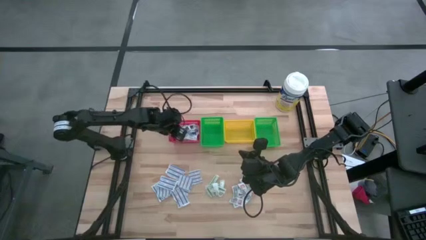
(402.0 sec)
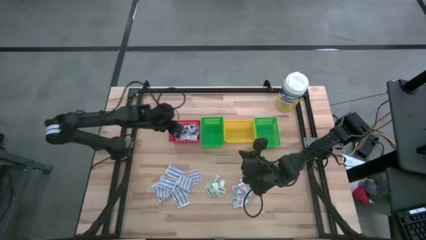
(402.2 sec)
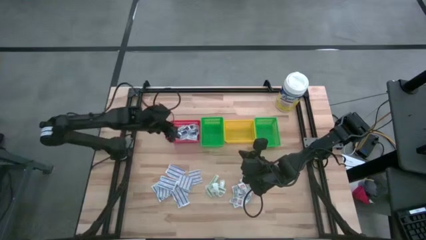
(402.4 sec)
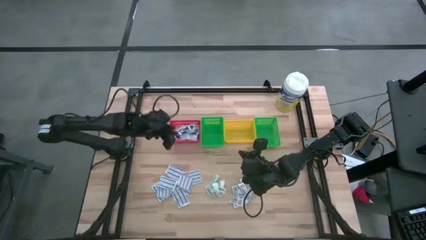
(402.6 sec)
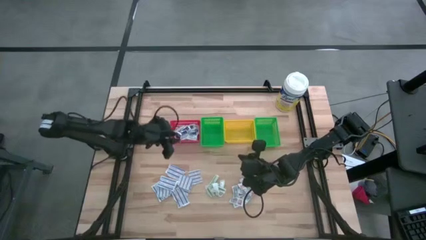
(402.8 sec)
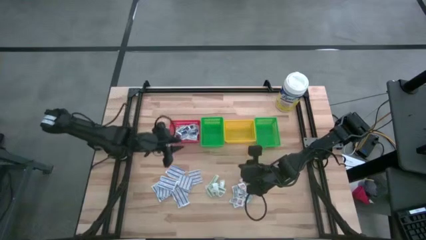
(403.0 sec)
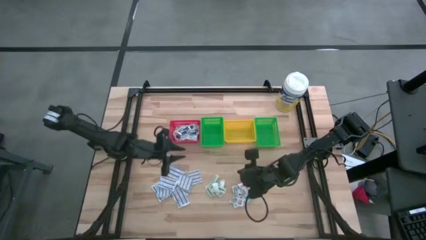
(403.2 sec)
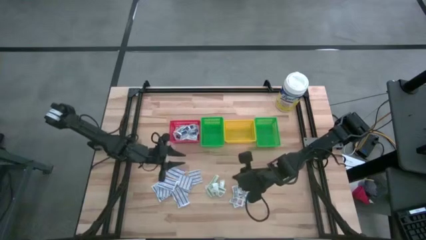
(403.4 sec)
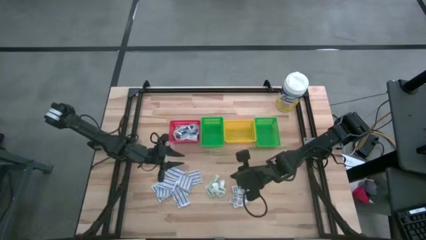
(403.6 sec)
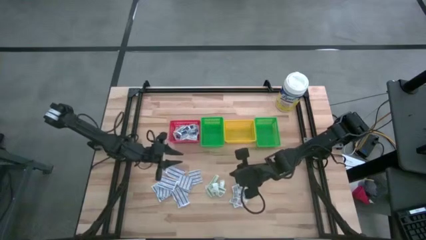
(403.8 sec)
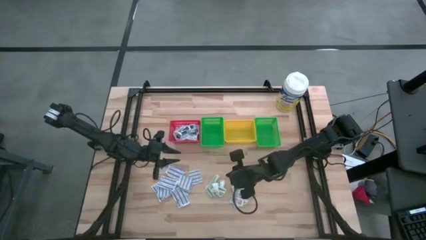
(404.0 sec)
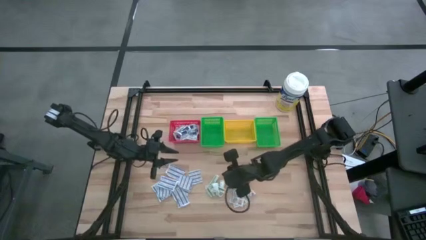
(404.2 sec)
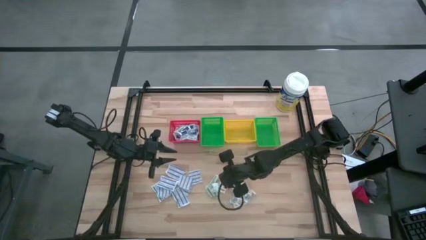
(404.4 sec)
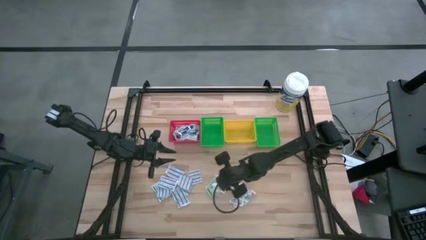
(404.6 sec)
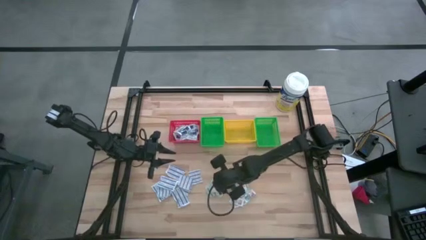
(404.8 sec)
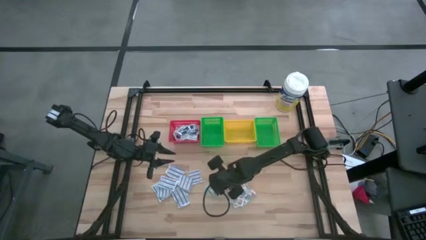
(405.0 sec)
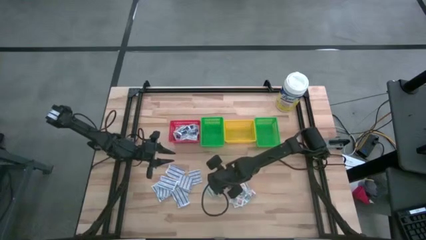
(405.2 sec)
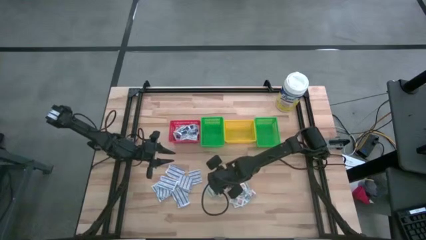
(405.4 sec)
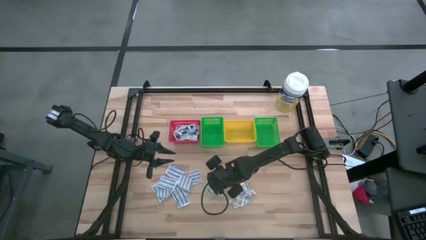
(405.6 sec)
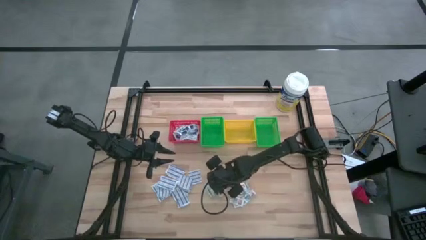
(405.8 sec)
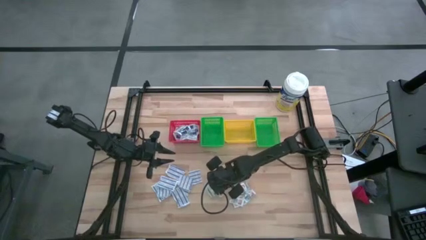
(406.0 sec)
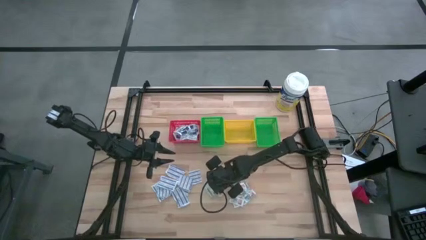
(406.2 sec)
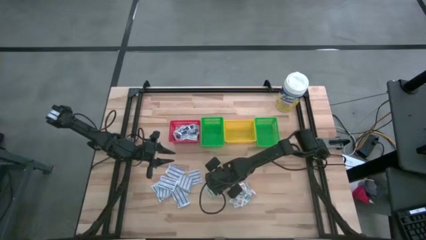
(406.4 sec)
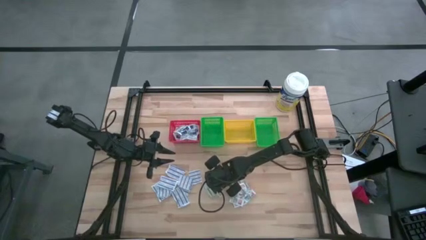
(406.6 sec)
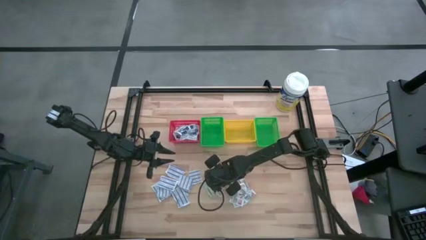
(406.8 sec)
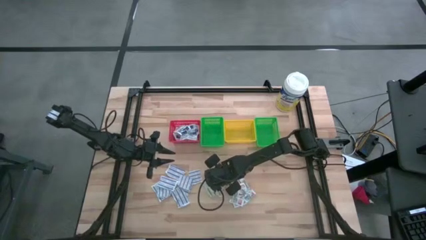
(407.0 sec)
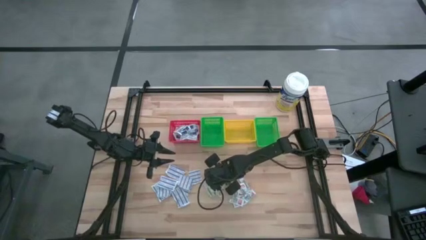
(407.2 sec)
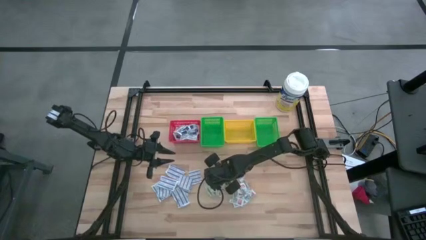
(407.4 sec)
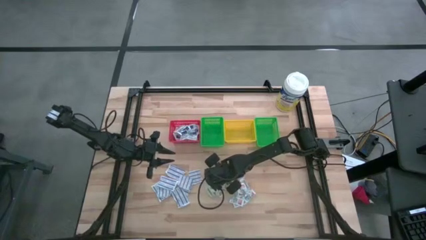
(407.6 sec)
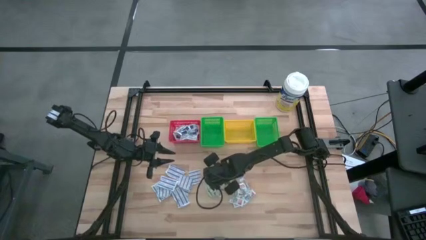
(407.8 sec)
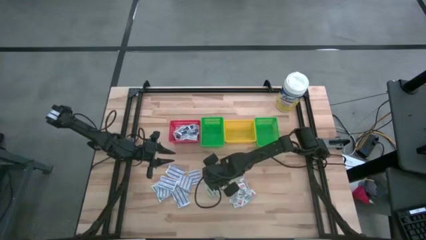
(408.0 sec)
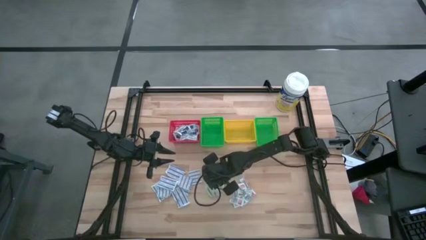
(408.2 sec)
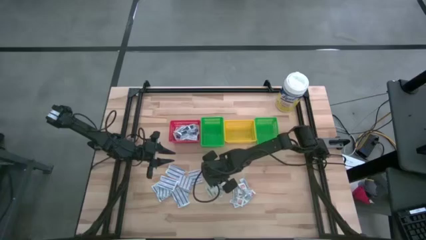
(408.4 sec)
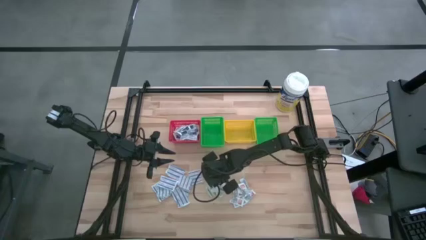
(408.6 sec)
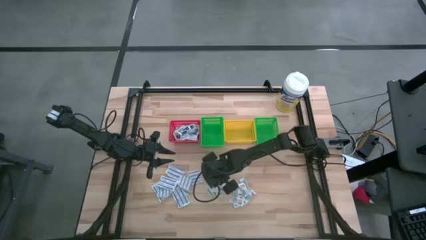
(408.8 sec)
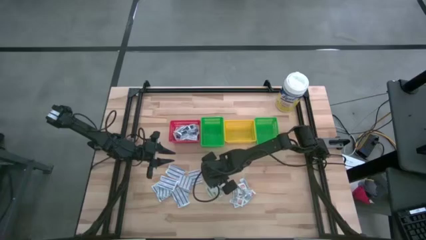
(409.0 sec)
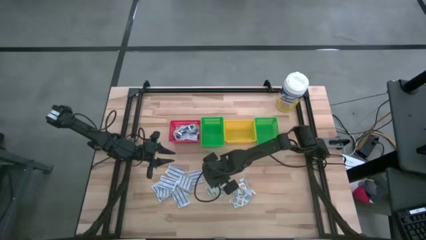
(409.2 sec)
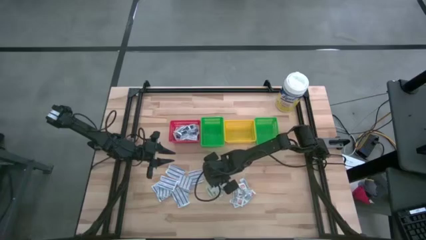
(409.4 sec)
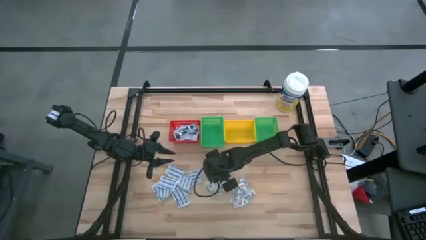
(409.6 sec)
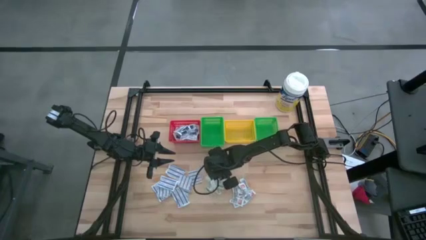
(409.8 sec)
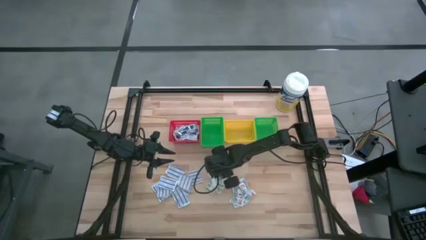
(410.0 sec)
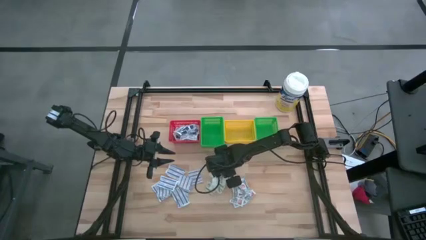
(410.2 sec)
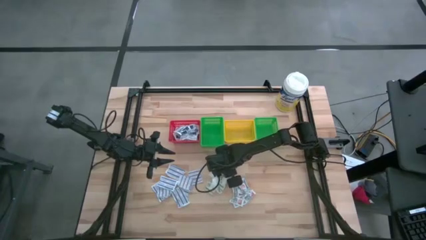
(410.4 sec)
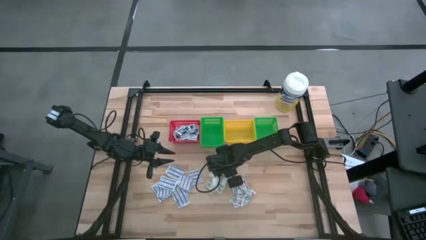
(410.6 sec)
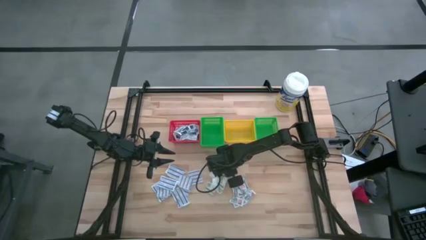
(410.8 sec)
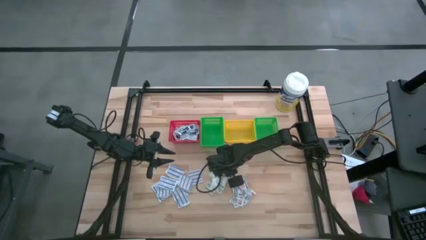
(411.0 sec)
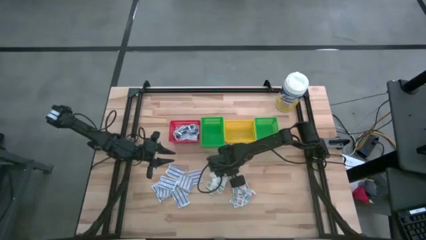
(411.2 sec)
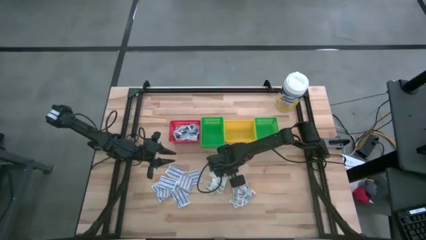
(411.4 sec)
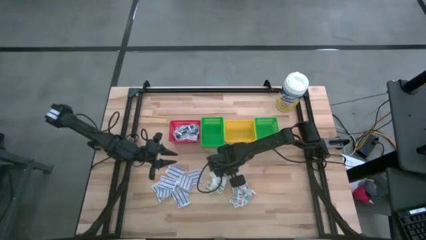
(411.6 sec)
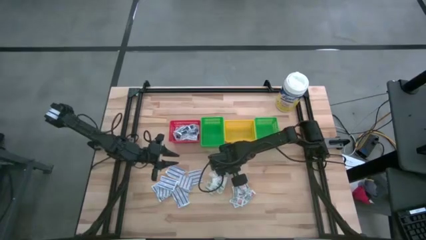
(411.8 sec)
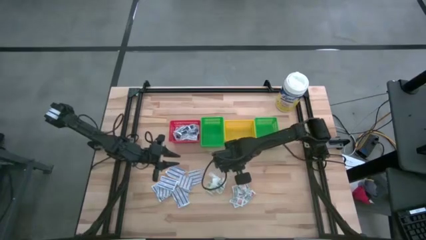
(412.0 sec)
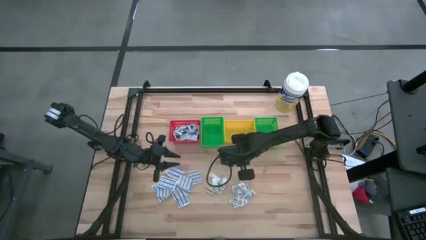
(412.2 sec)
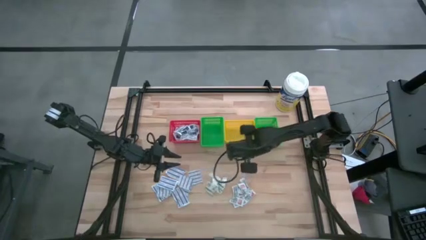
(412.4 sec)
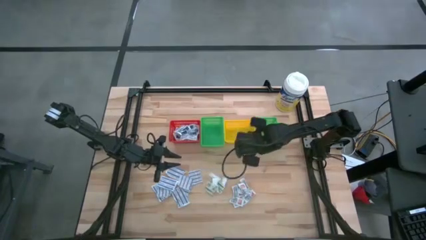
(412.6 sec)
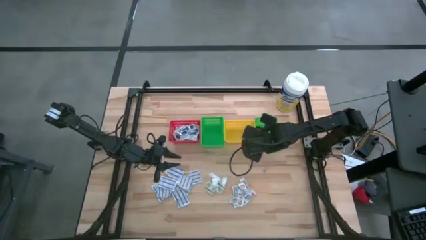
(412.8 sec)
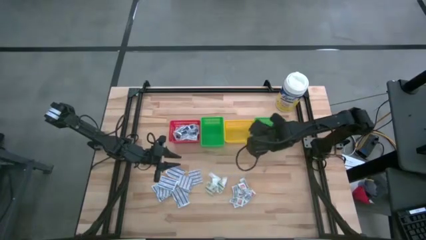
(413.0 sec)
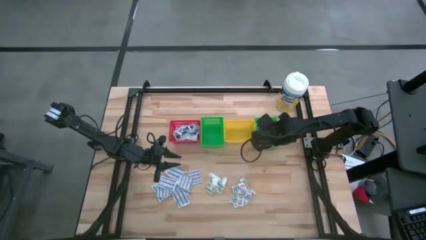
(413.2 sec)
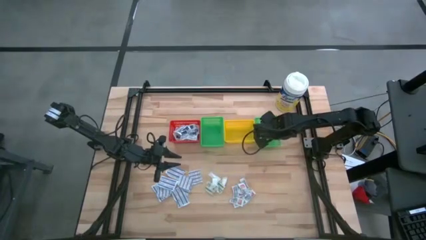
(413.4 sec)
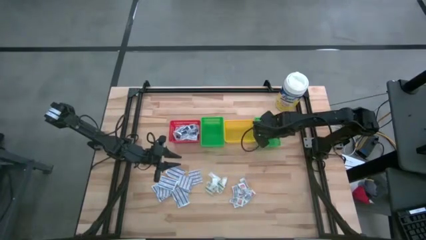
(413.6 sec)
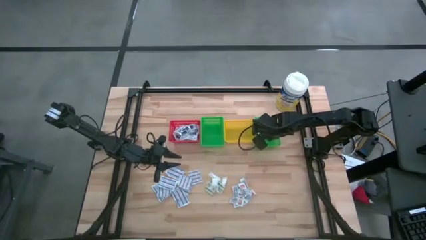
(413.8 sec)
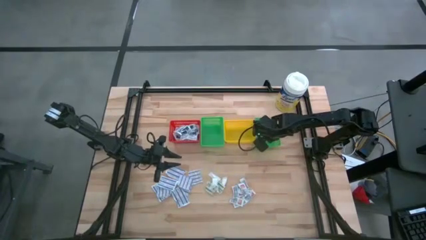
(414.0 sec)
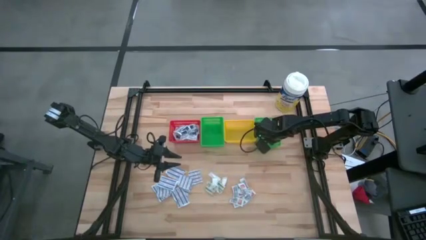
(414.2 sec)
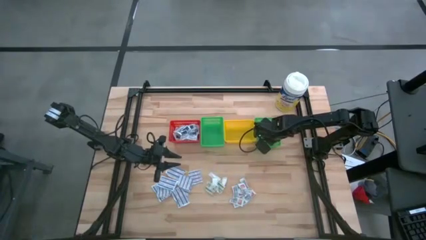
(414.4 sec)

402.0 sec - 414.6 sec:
Task: Pick & Place First Aid Supplies
Put the green bandage into the right green basket

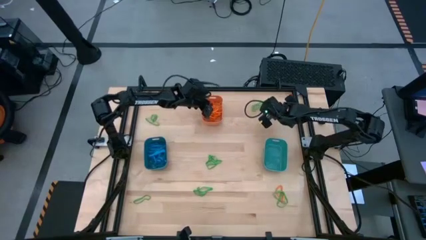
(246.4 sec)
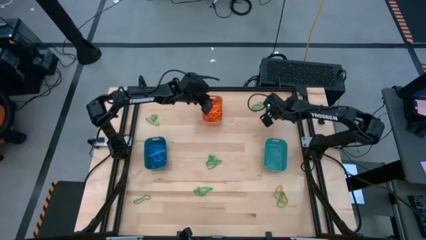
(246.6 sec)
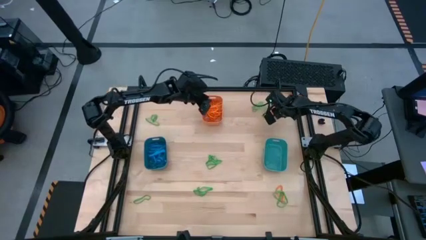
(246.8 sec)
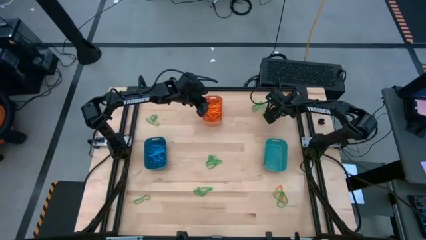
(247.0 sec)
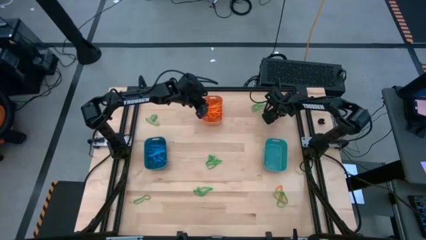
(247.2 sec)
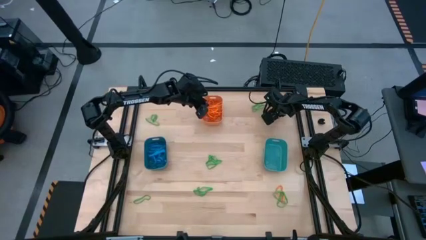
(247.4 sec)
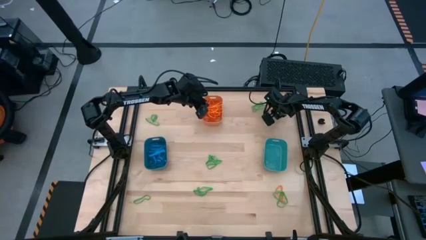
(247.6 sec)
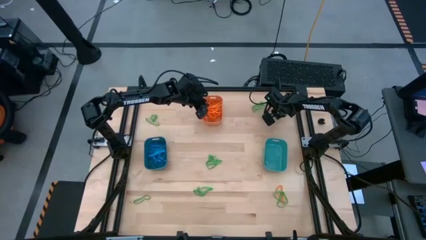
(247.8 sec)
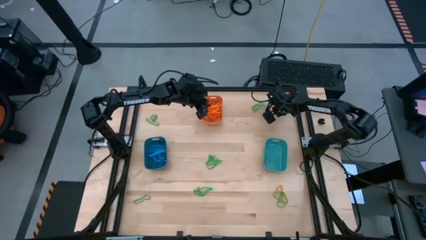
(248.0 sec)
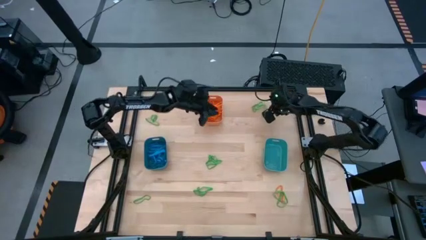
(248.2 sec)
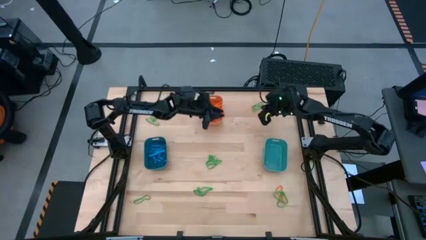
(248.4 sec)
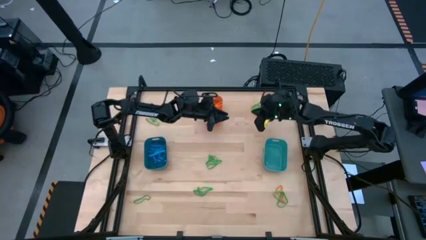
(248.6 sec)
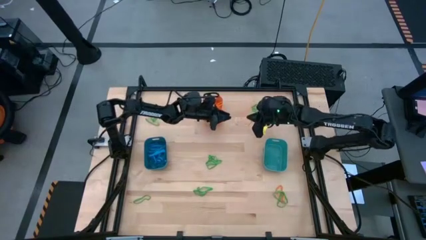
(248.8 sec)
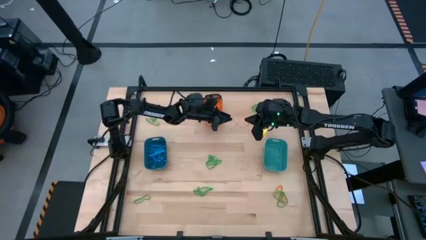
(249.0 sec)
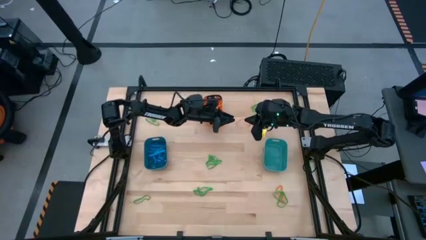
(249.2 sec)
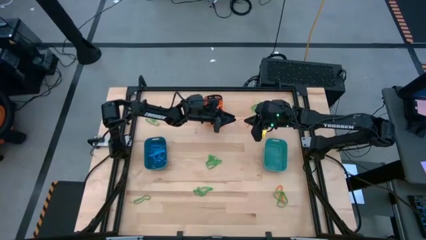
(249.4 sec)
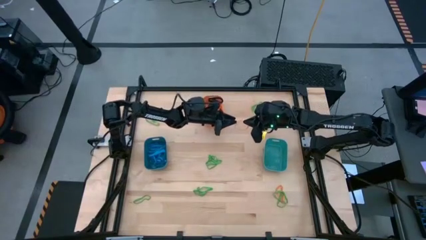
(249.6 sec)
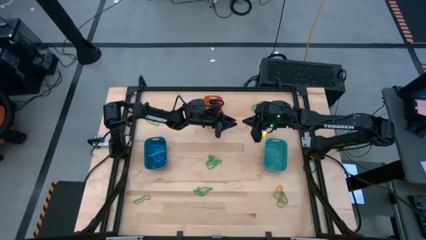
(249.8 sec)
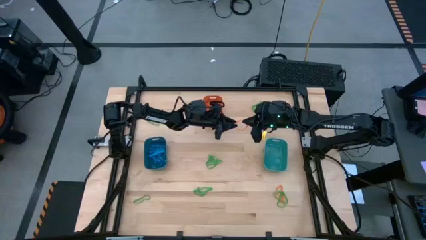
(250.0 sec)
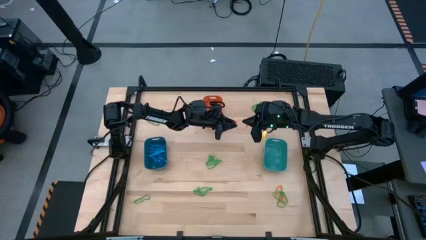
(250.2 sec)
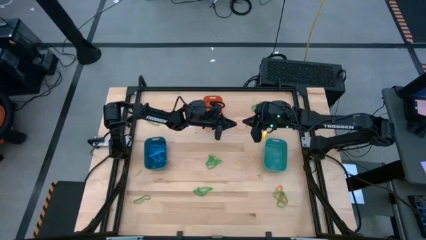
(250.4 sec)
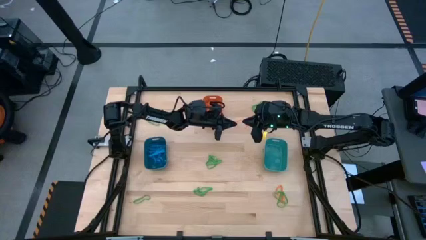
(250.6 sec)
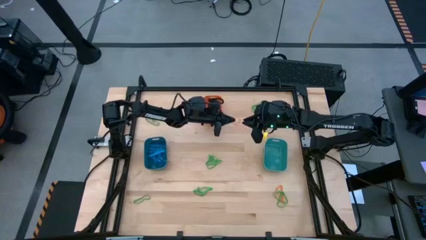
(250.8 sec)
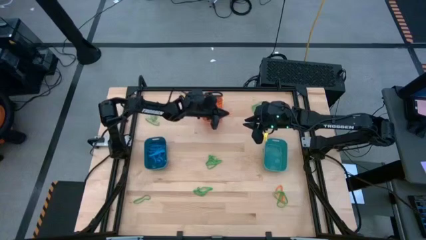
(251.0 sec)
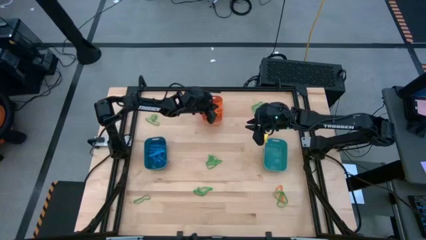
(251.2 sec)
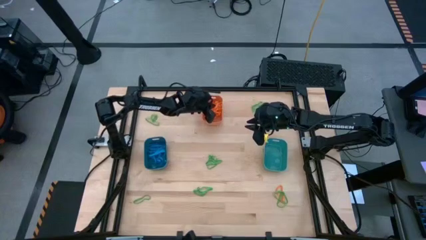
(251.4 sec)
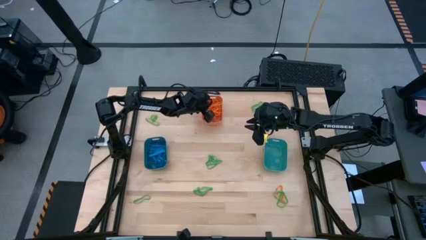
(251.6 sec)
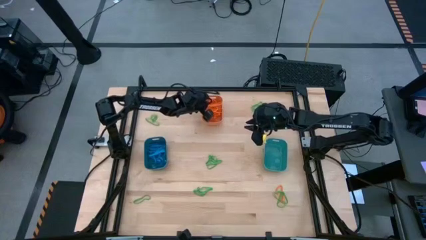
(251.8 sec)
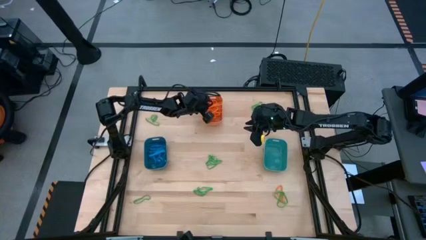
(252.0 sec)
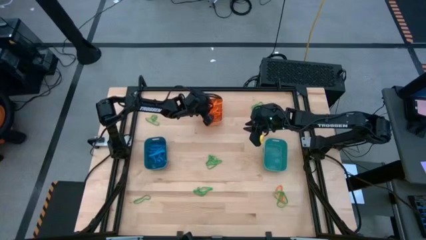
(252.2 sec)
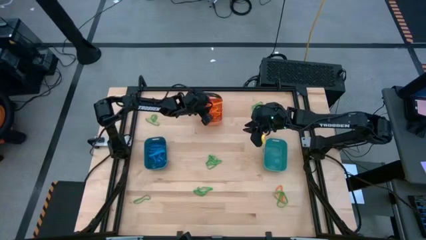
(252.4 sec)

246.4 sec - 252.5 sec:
Task: Sort rubber bands into baskets
Put the orange rubber band into the orange bin
